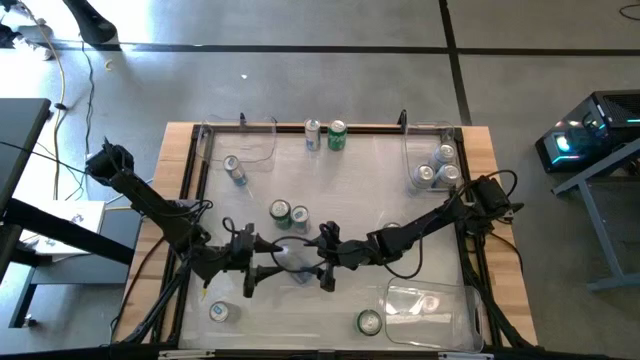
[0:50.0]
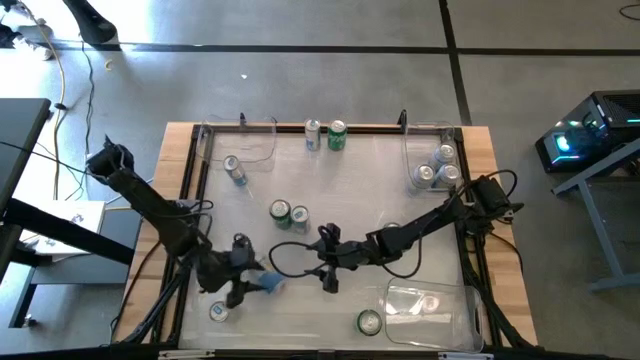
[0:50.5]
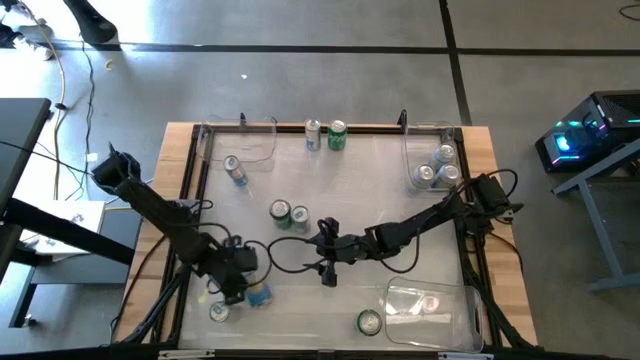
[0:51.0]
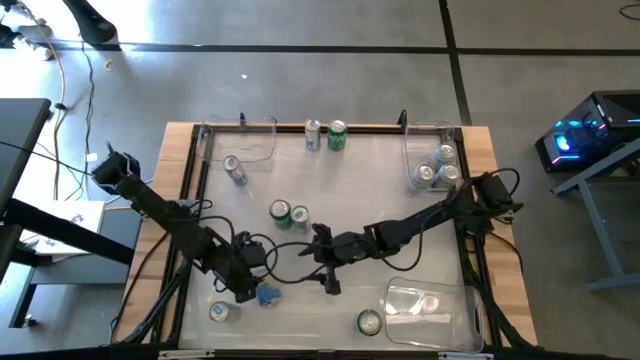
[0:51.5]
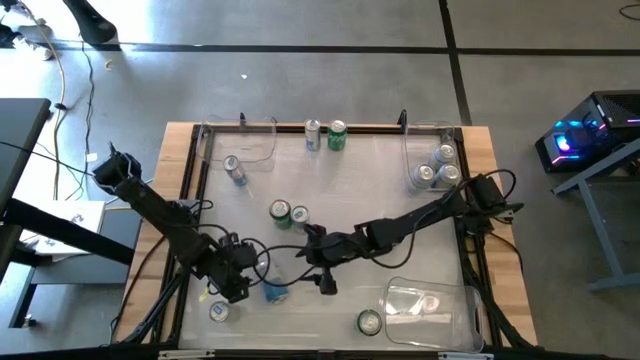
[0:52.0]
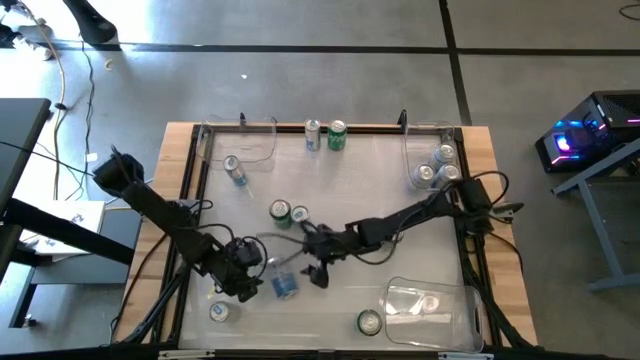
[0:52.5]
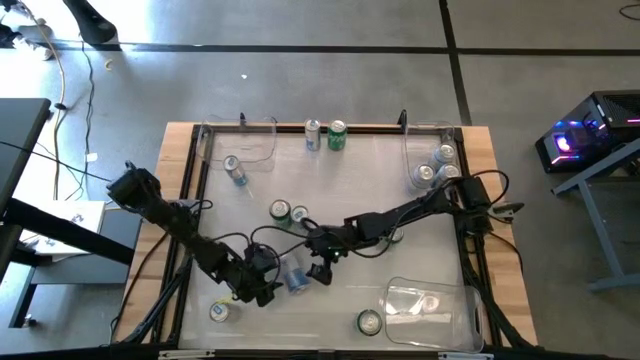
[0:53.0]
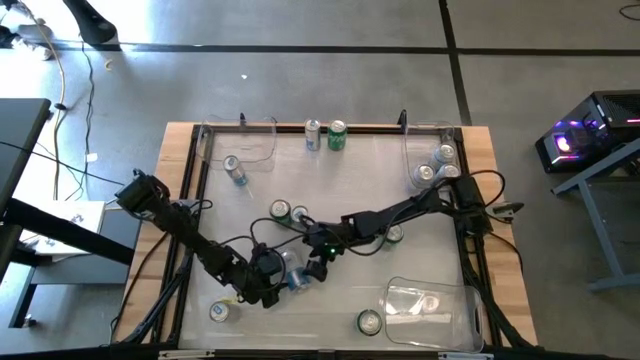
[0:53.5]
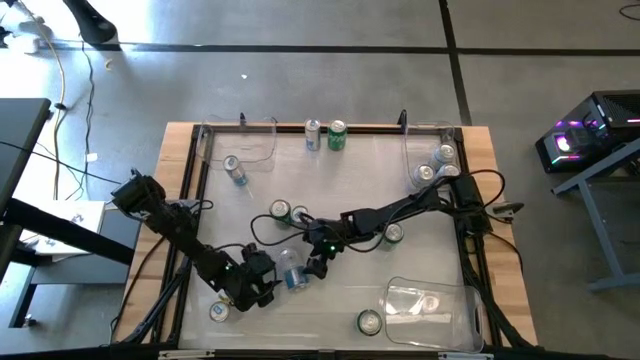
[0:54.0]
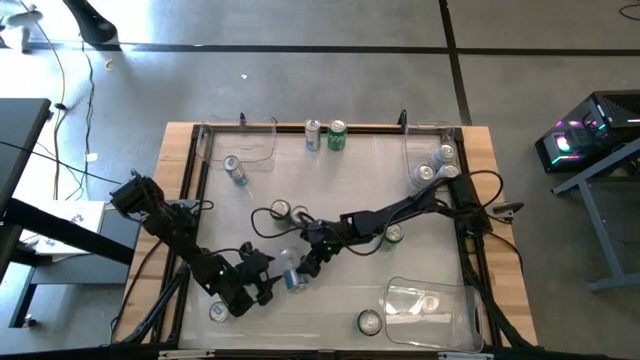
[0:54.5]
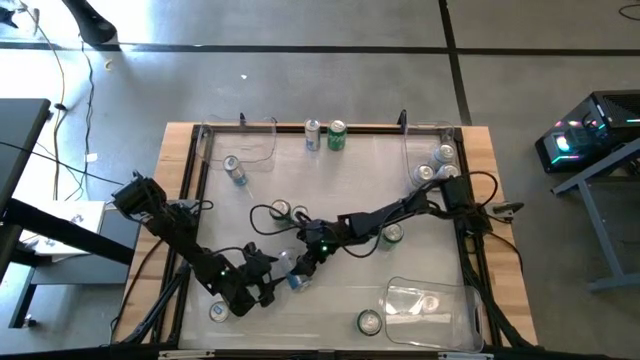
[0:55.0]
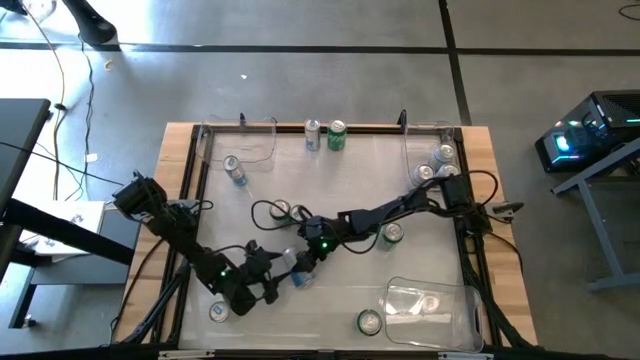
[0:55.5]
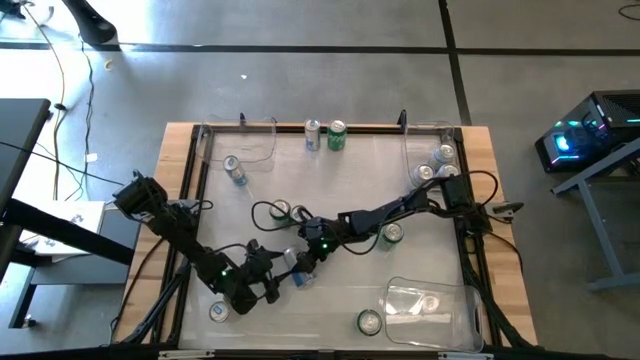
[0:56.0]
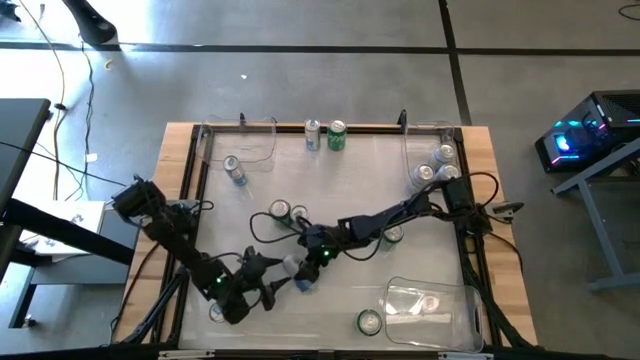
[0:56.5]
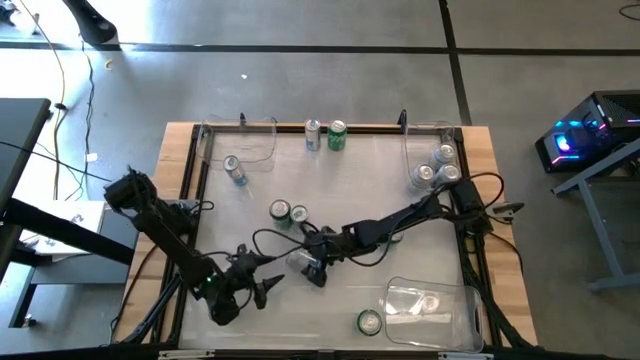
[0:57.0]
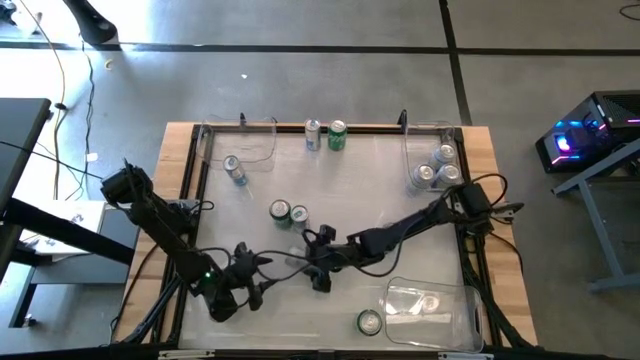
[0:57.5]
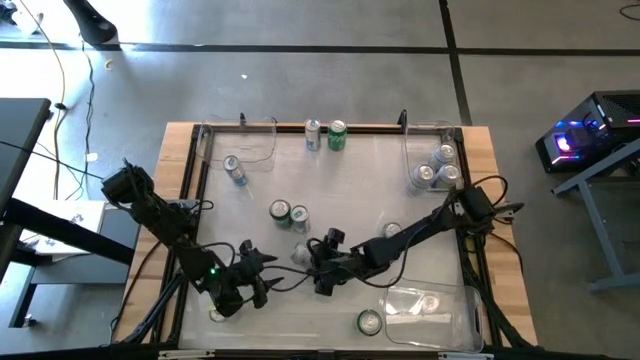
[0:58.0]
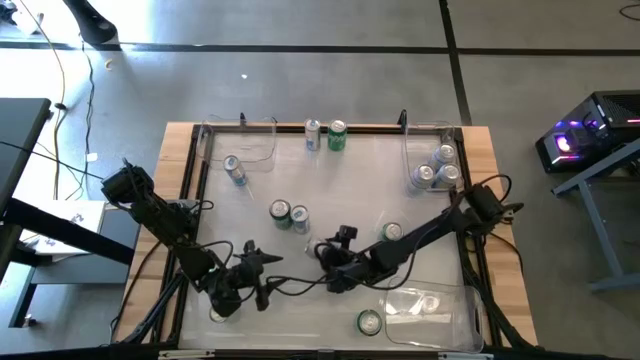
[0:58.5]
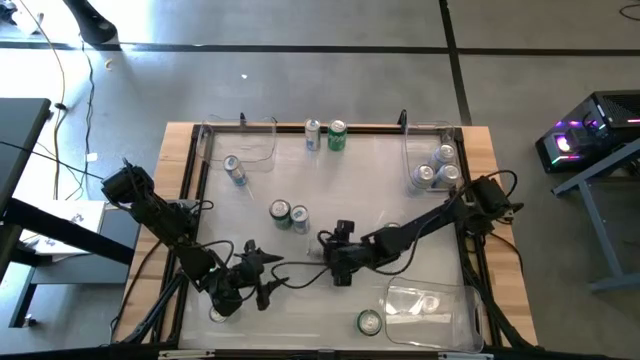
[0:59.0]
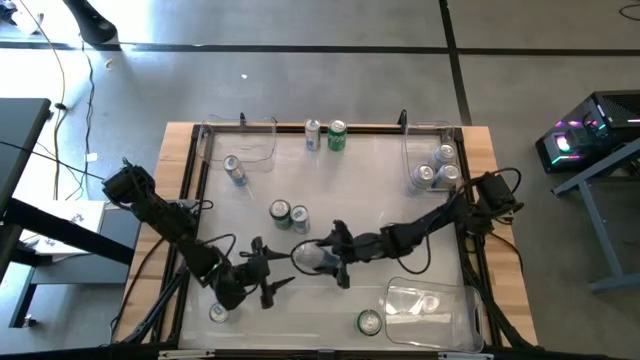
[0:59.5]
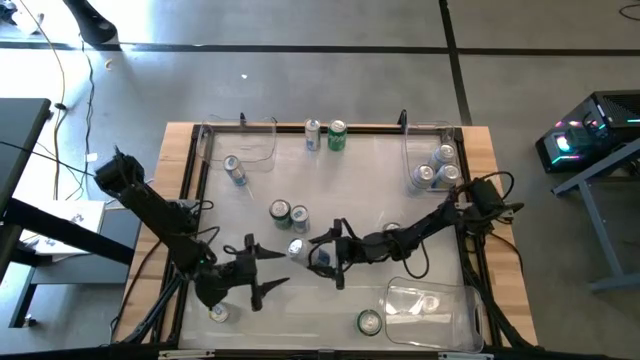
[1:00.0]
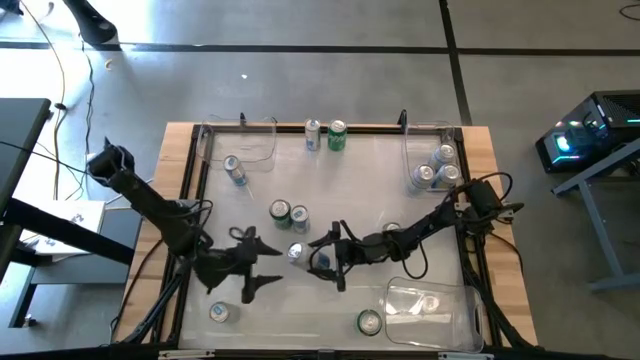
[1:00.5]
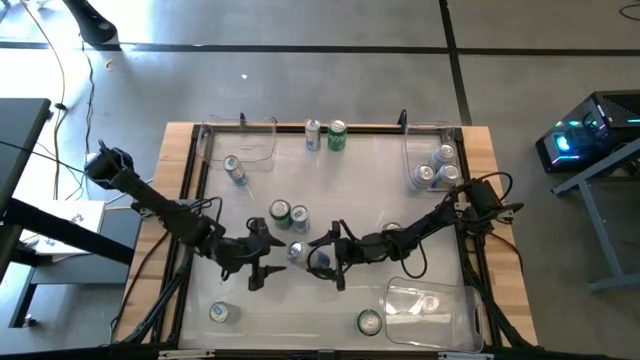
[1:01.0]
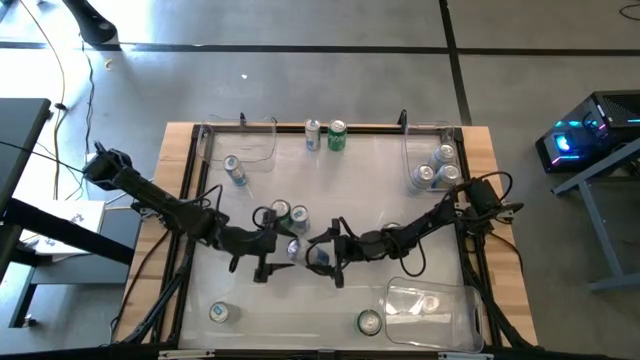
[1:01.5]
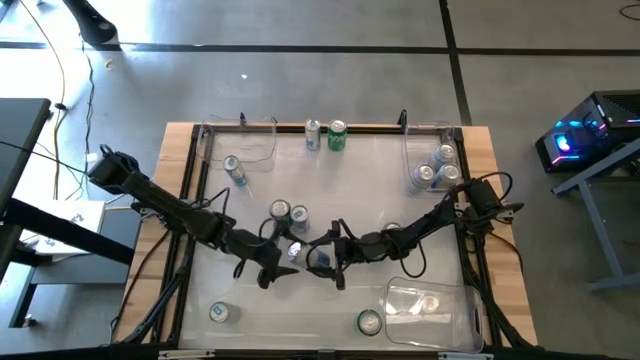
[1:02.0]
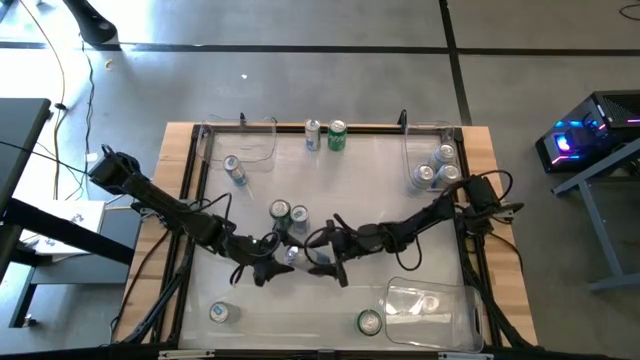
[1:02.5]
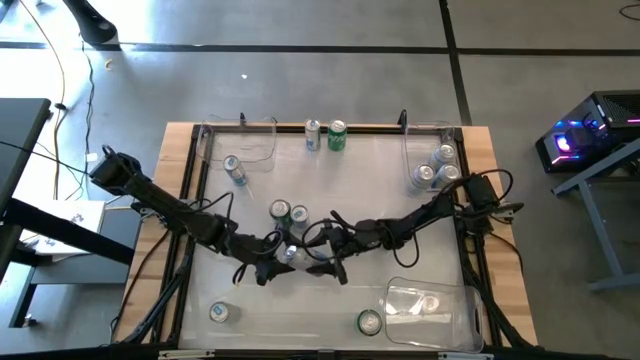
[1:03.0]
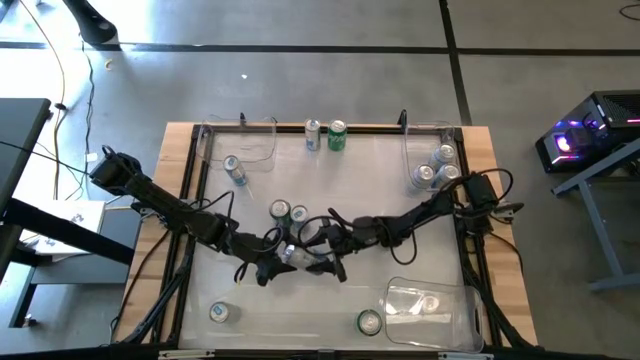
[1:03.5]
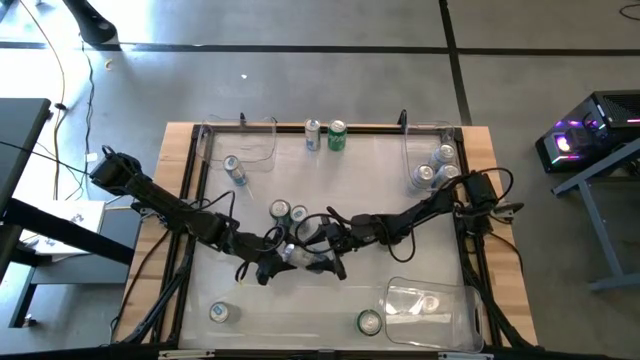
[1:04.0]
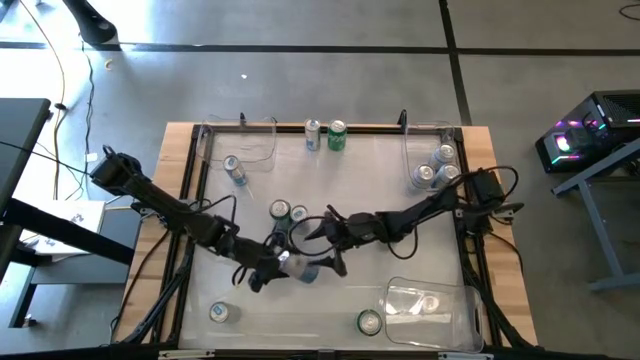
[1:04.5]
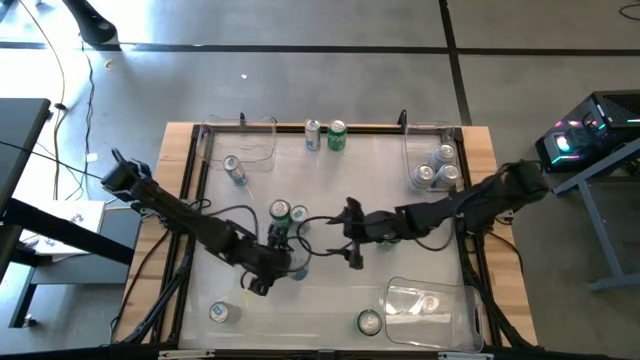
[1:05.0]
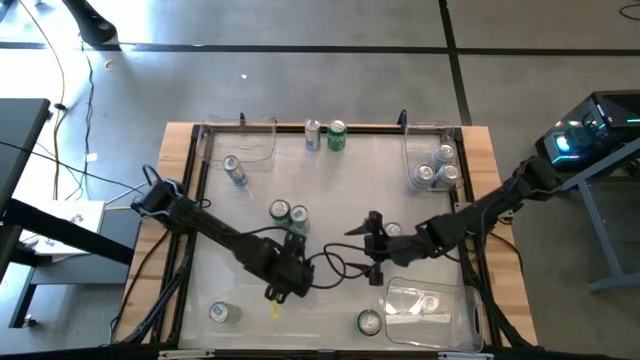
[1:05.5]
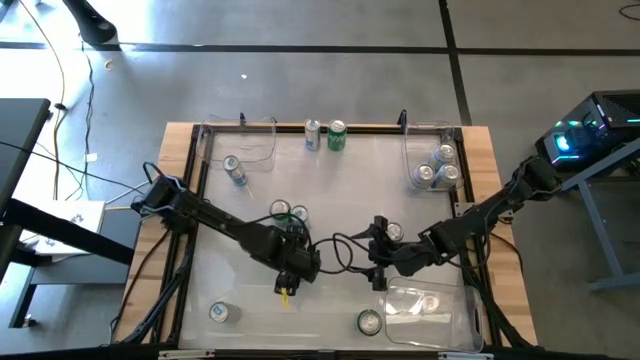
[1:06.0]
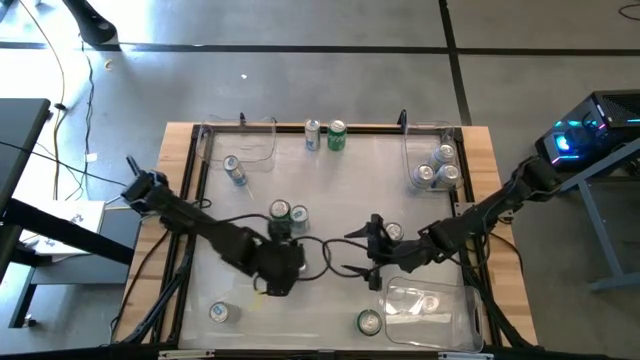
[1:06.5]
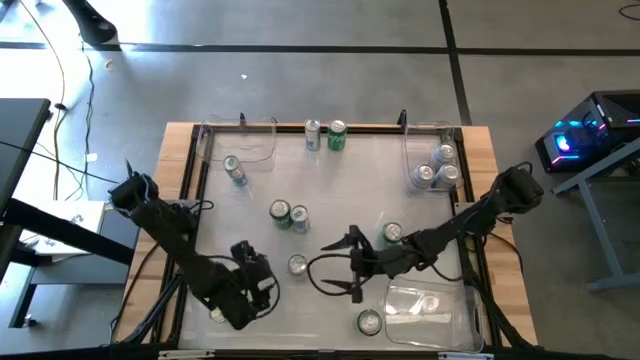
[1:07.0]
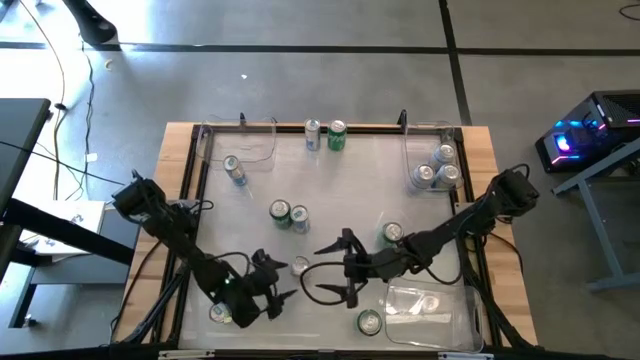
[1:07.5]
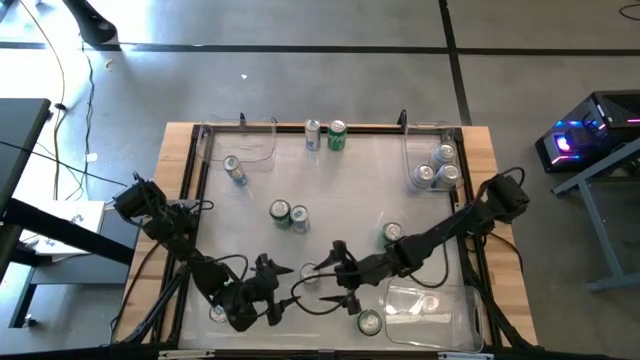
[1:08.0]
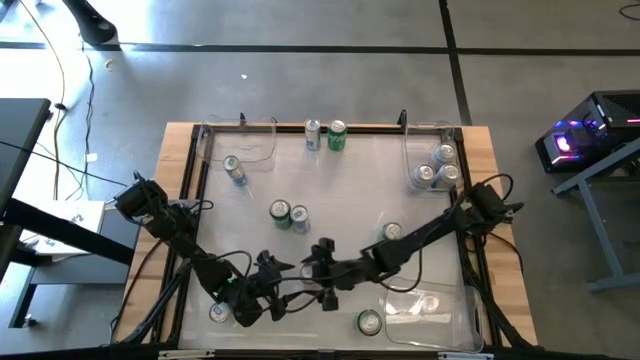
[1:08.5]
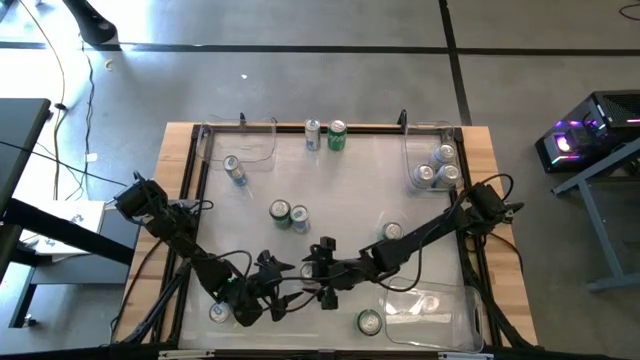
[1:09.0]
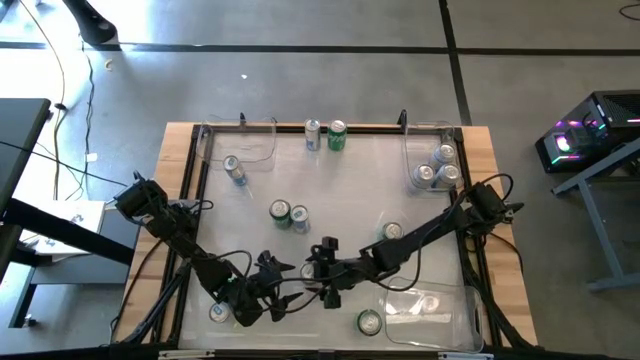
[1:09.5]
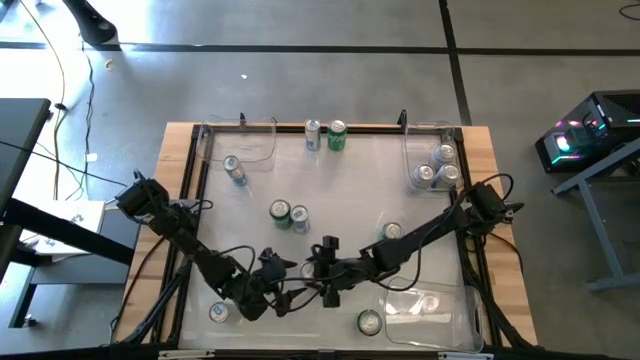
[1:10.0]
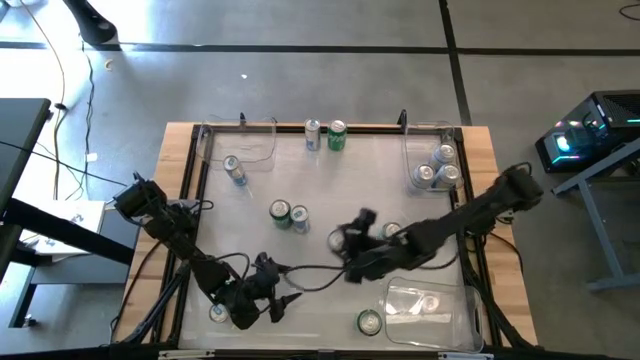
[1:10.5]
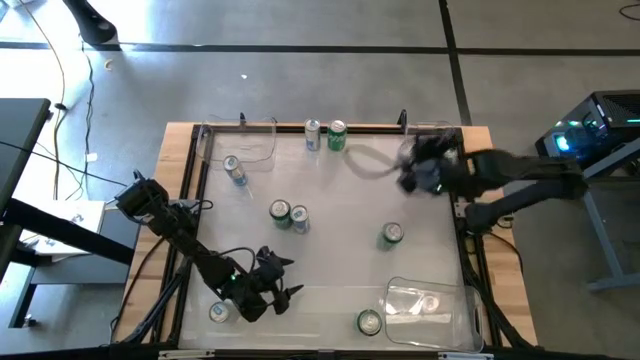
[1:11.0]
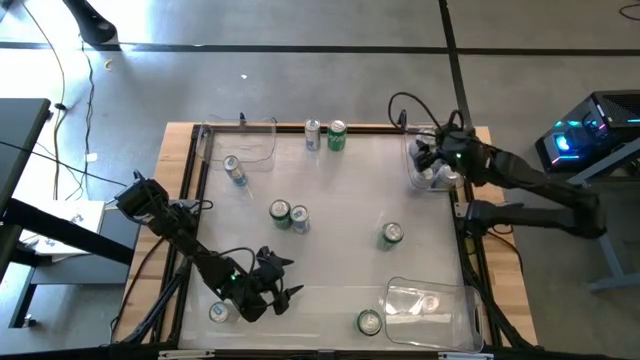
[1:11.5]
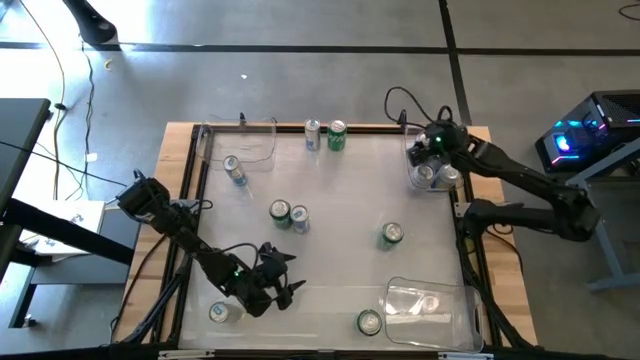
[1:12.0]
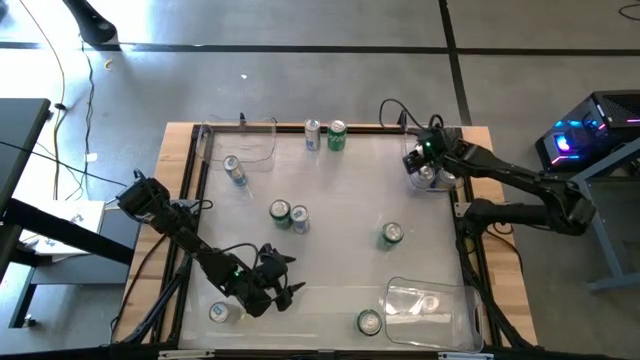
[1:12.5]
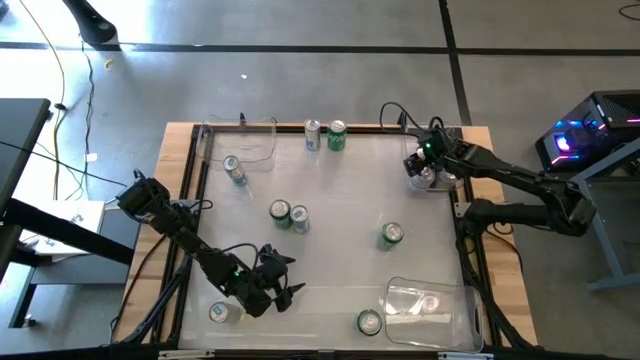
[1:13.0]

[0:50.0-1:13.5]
Task: Sort soda cans
Put the blue soda can into the top right transparent bin
